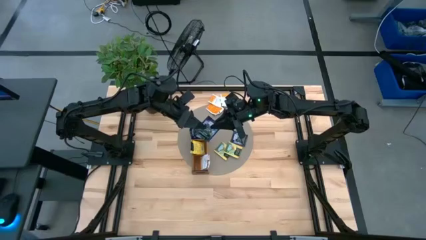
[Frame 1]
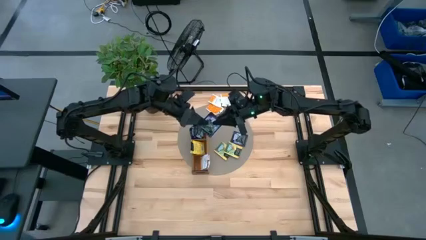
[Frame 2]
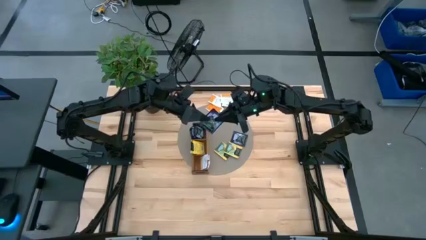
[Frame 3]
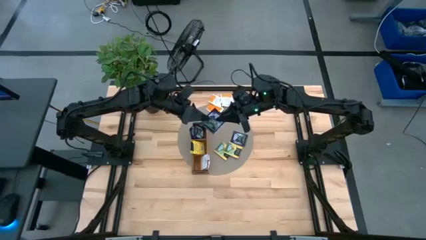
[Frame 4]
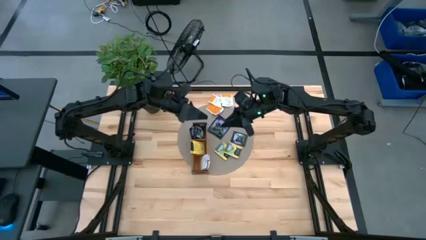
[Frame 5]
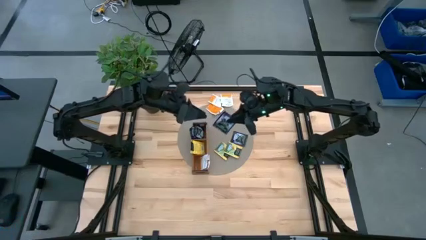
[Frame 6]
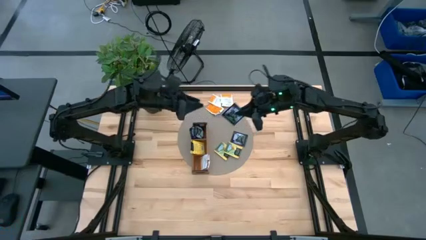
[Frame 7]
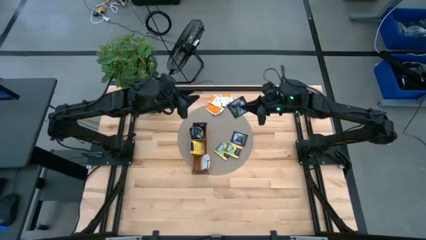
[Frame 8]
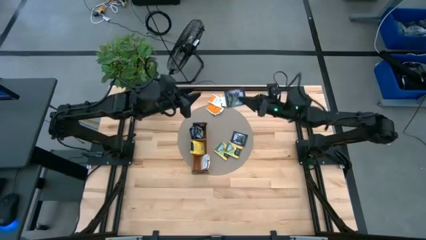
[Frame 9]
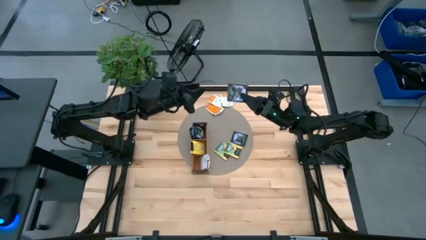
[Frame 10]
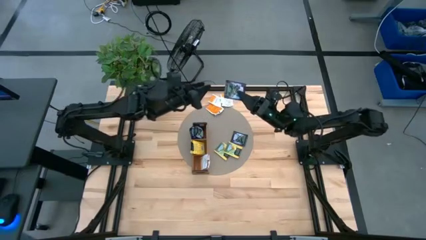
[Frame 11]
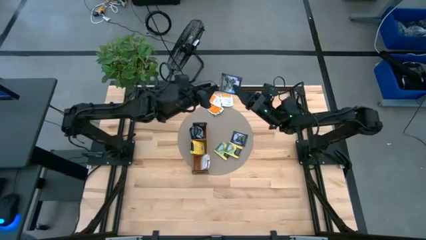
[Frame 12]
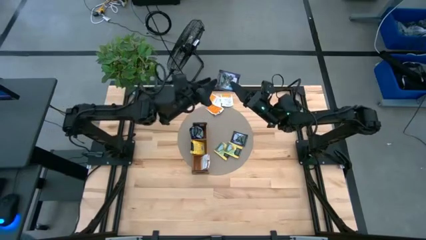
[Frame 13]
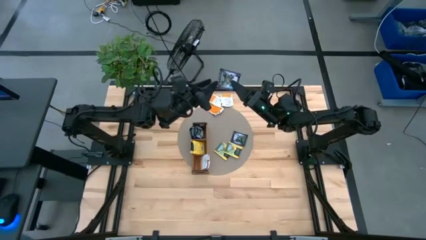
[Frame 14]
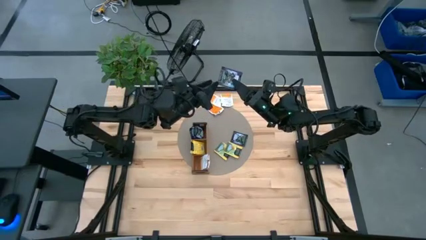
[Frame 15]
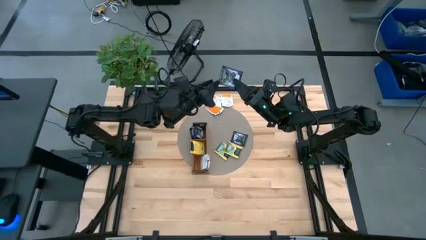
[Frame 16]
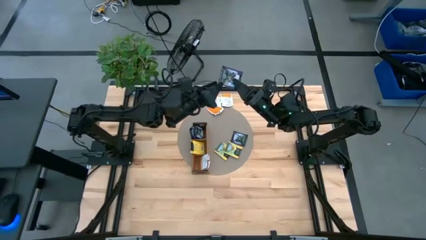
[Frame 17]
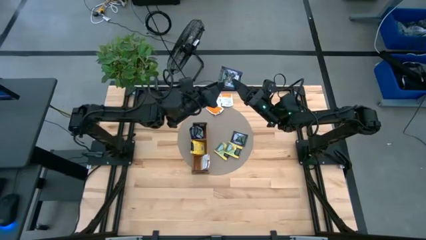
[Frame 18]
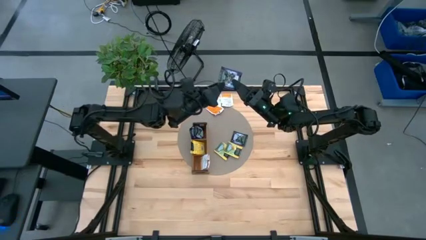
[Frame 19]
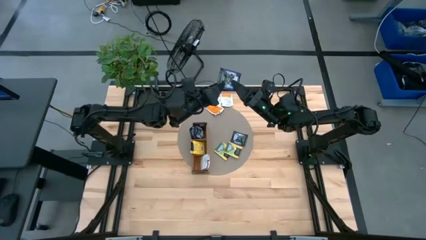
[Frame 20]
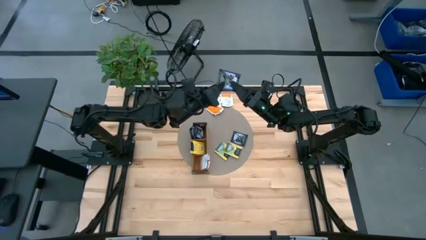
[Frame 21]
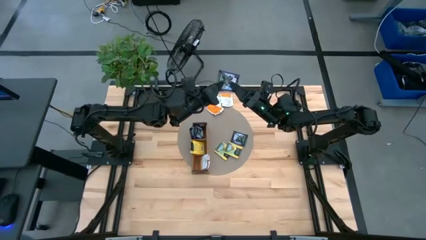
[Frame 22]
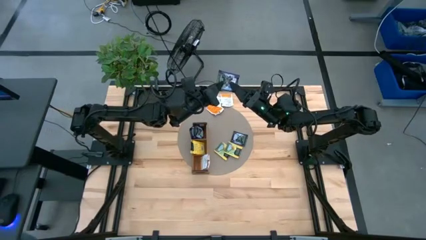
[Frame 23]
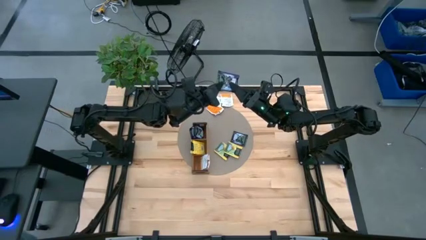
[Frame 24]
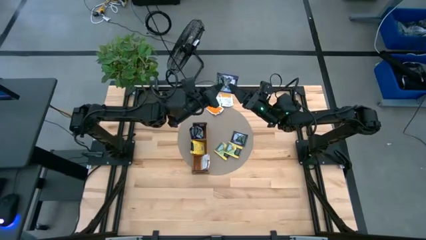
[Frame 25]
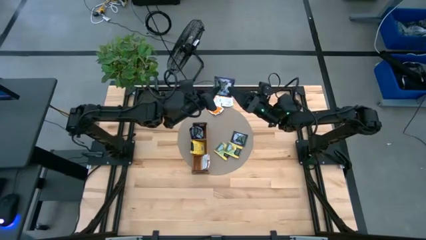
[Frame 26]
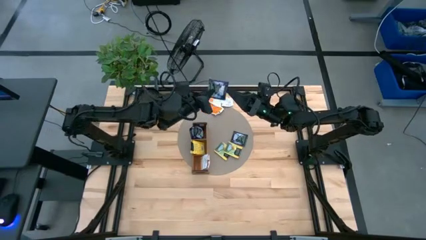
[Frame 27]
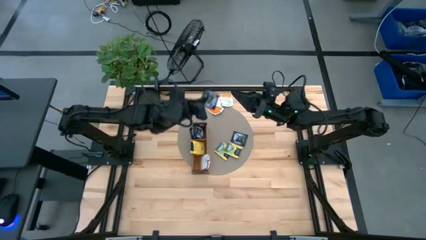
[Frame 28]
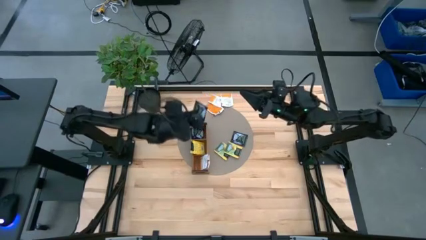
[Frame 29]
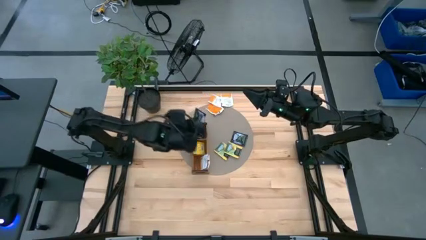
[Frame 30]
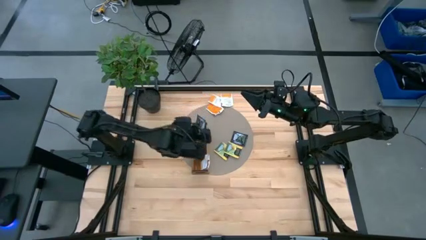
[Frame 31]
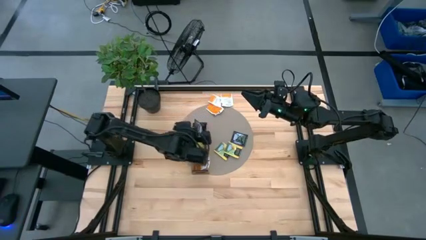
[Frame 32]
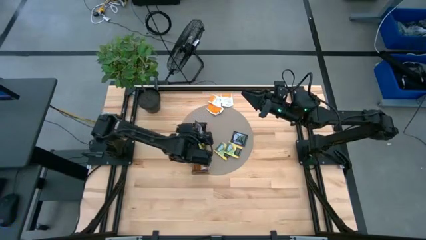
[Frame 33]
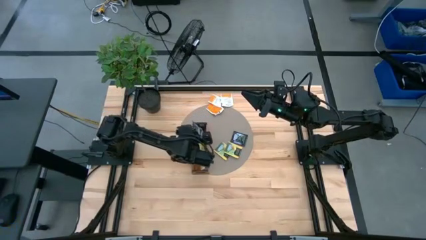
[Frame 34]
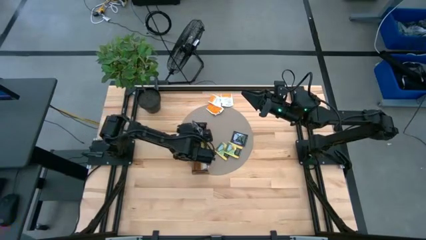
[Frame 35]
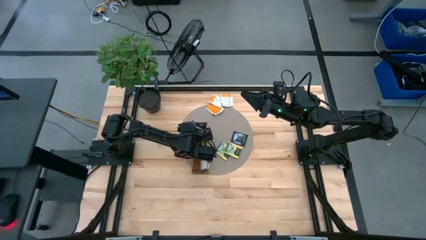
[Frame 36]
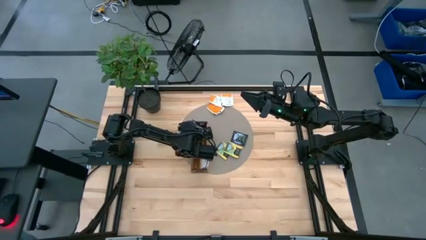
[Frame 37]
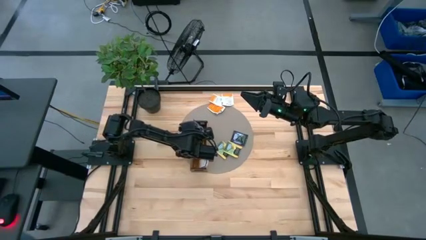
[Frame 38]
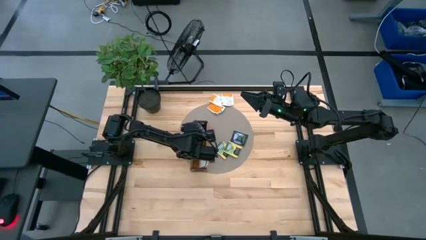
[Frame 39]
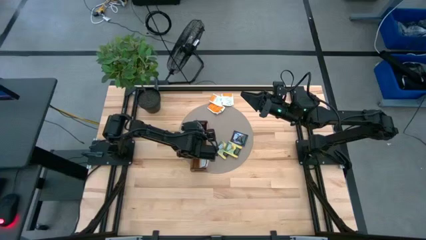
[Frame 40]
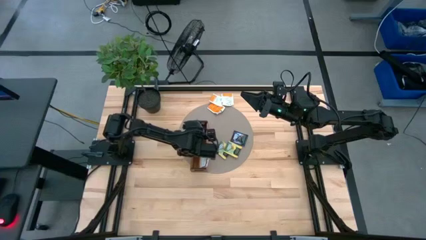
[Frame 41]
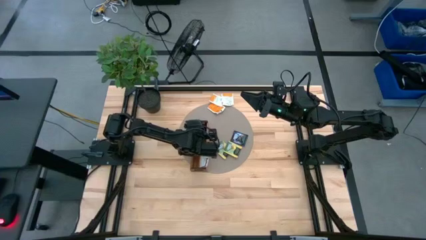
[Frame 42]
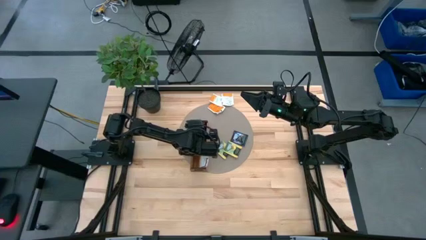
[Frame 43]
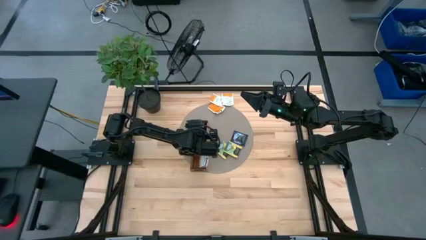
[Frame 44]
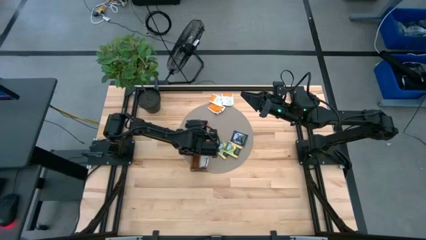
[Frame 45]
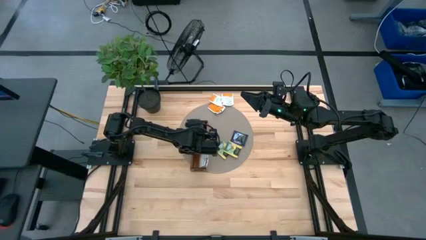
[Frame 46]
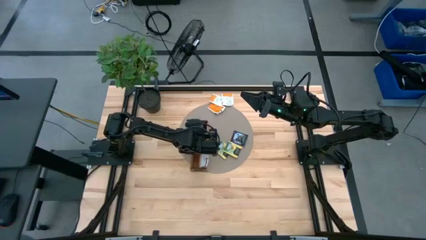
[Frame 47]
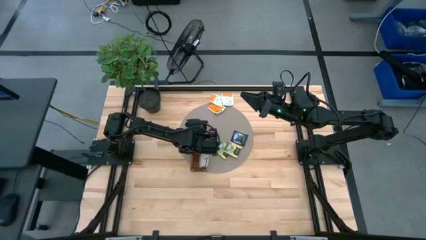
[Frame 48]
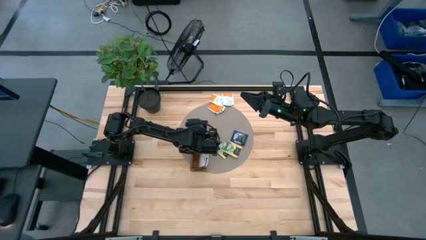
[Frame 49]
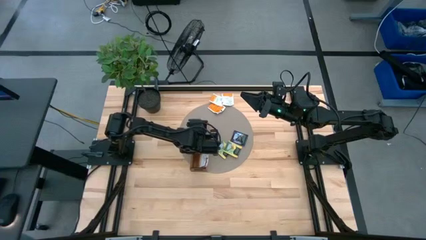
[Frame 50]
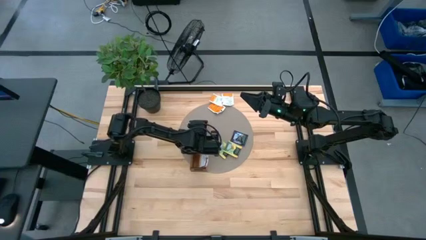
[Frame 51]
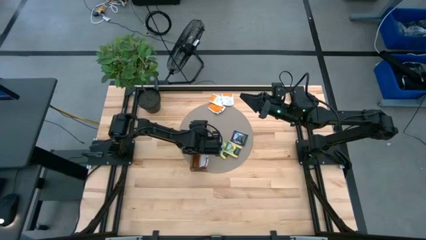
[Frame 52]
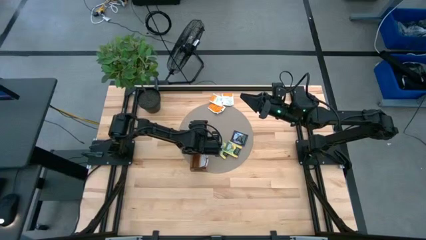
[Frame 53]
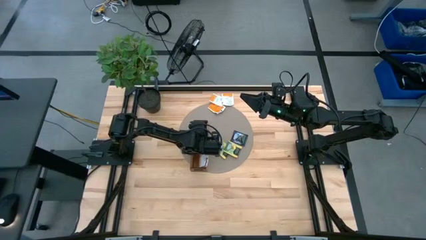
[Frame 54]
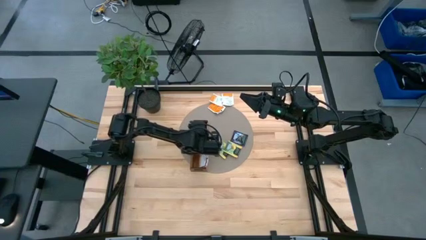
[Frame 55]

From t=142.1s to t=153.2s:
Task: Pick & Place Tea
Put the violet tea bag into the top section of the wooden organizer
